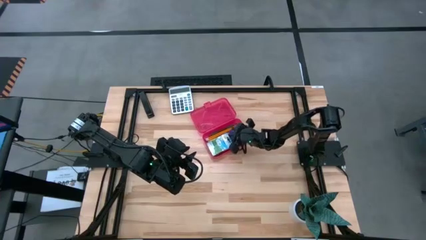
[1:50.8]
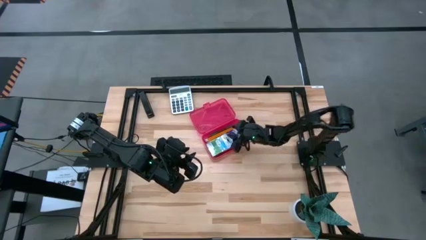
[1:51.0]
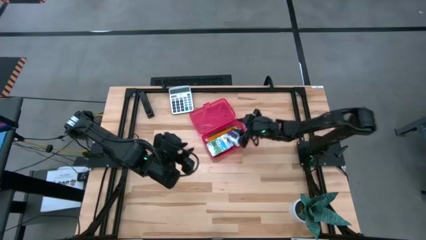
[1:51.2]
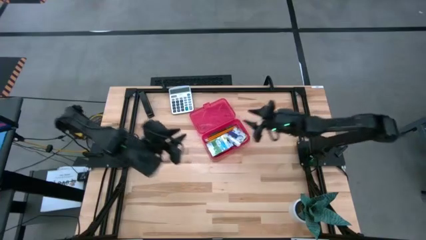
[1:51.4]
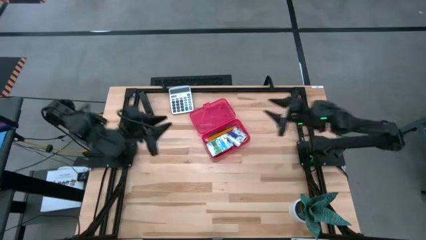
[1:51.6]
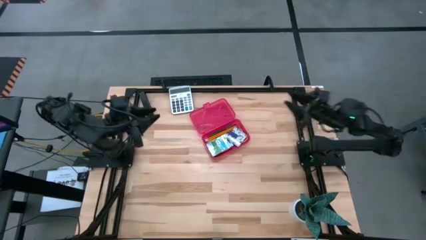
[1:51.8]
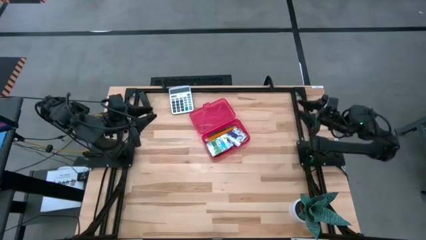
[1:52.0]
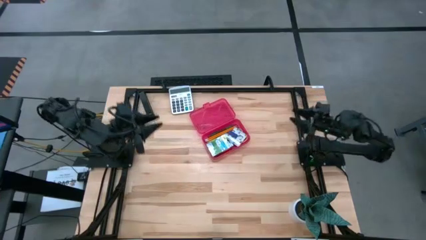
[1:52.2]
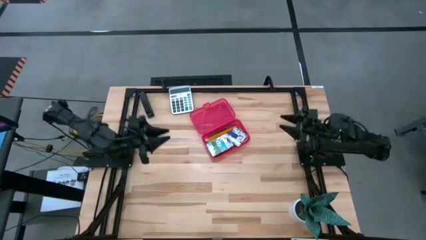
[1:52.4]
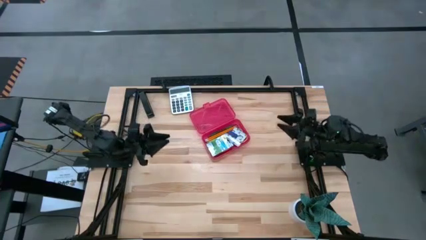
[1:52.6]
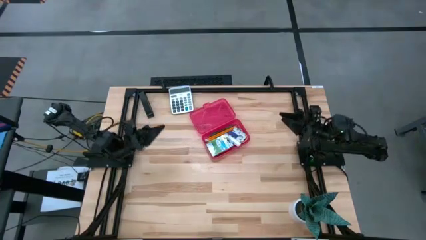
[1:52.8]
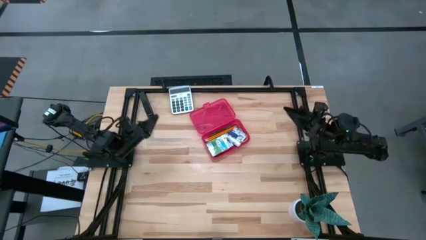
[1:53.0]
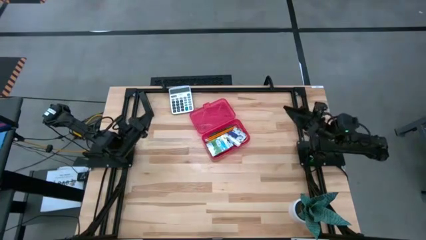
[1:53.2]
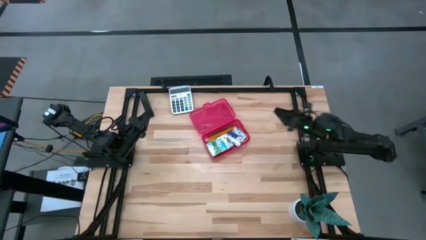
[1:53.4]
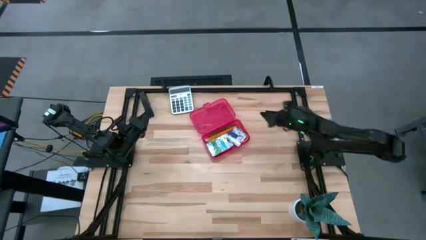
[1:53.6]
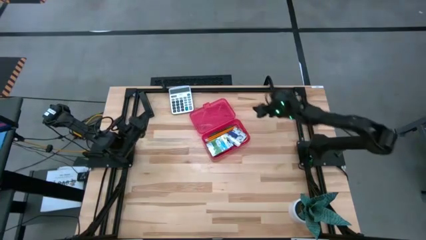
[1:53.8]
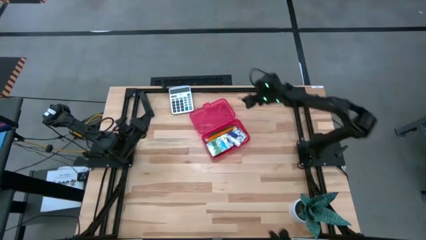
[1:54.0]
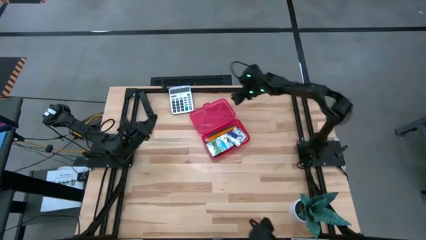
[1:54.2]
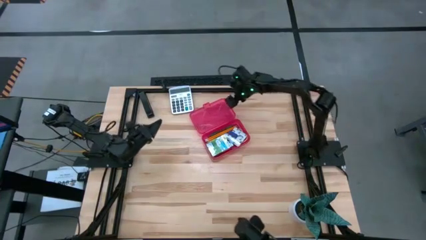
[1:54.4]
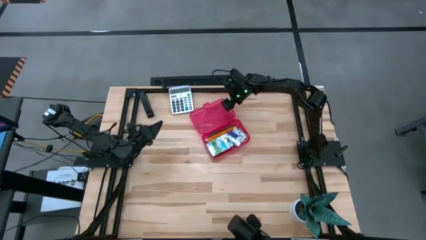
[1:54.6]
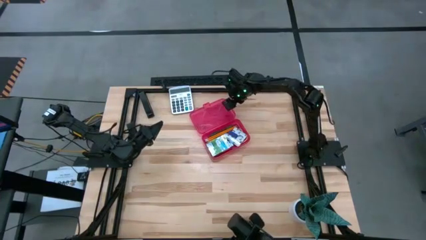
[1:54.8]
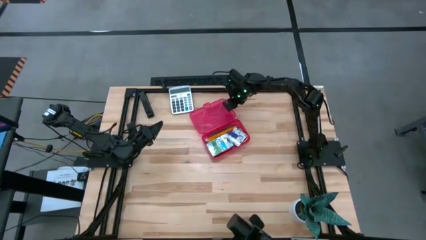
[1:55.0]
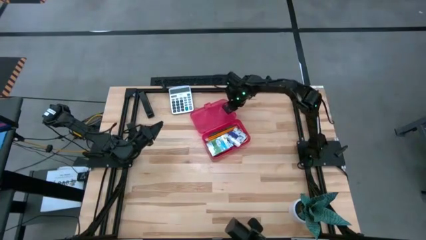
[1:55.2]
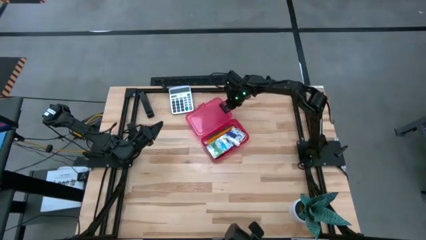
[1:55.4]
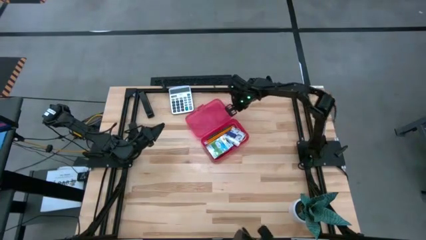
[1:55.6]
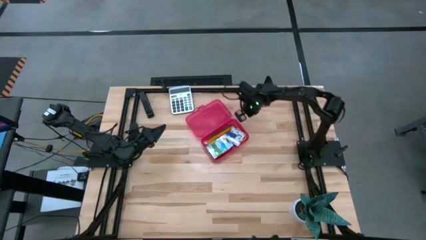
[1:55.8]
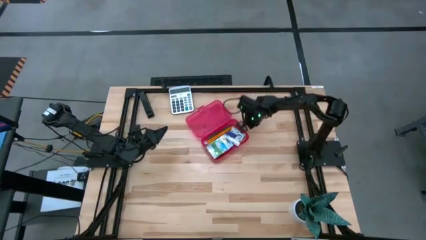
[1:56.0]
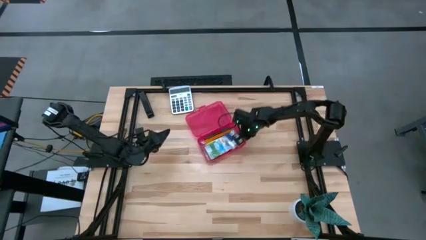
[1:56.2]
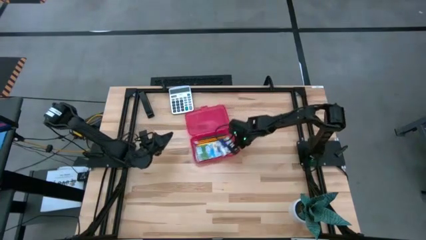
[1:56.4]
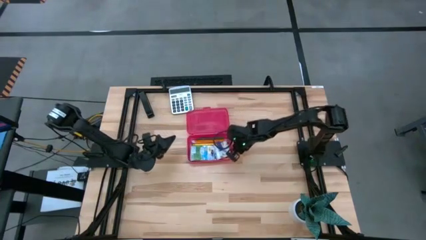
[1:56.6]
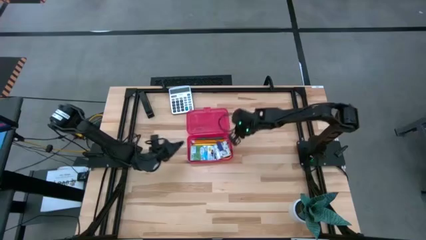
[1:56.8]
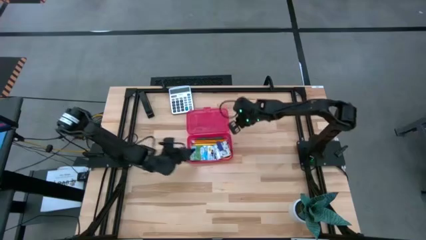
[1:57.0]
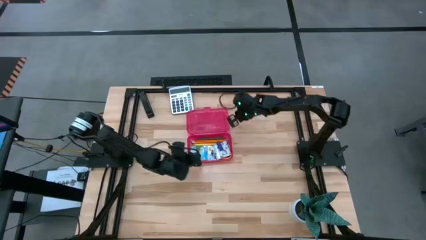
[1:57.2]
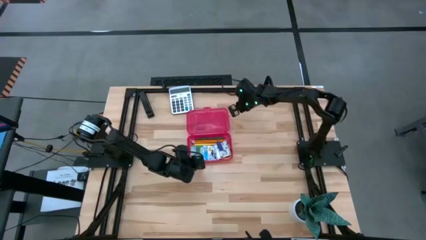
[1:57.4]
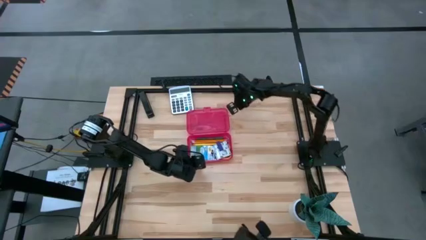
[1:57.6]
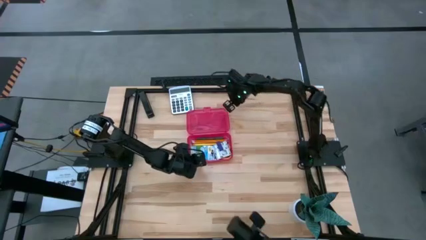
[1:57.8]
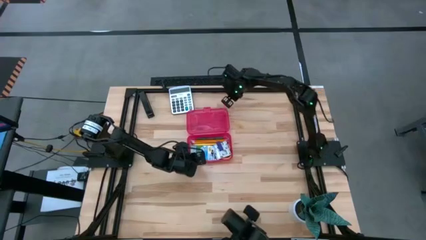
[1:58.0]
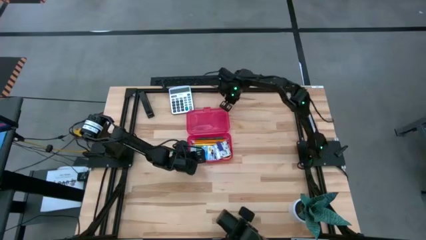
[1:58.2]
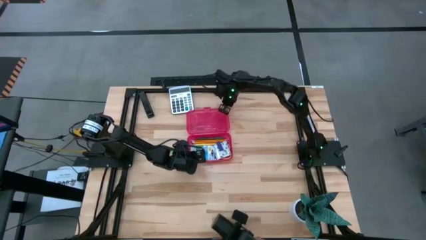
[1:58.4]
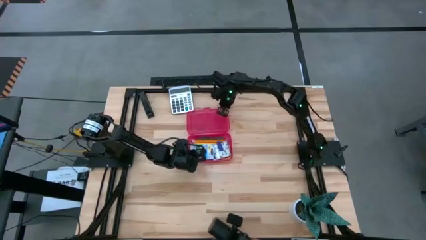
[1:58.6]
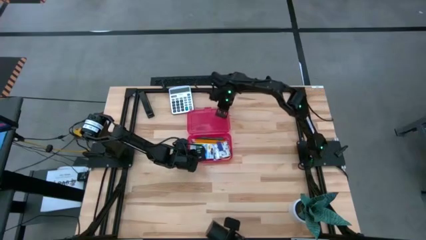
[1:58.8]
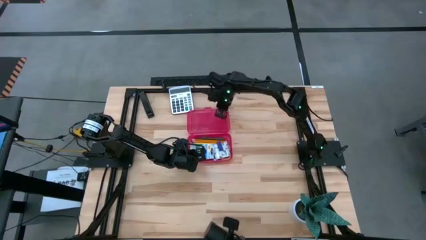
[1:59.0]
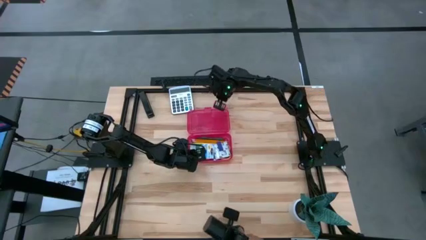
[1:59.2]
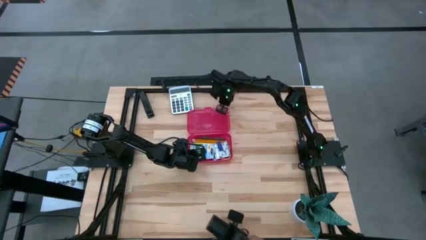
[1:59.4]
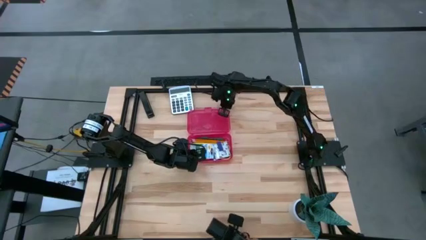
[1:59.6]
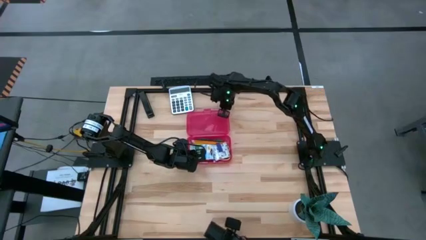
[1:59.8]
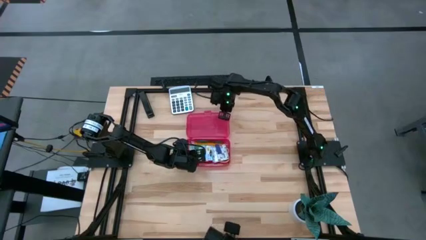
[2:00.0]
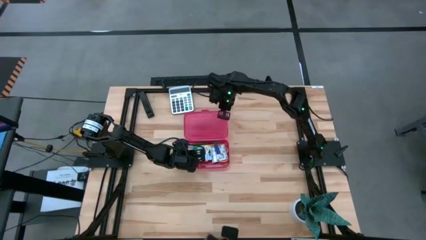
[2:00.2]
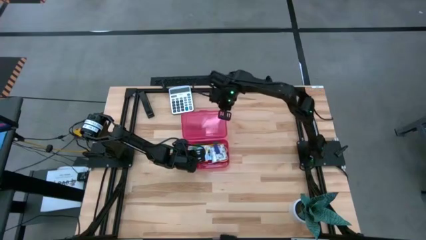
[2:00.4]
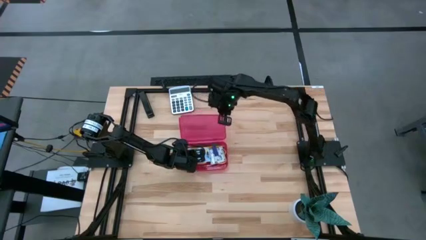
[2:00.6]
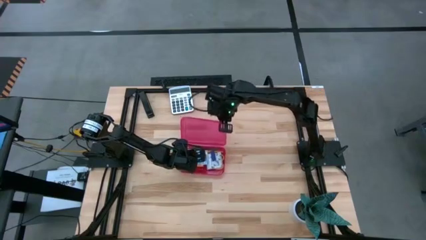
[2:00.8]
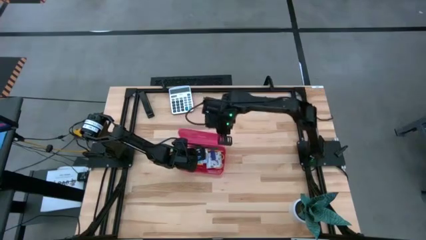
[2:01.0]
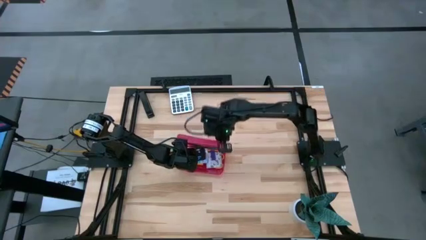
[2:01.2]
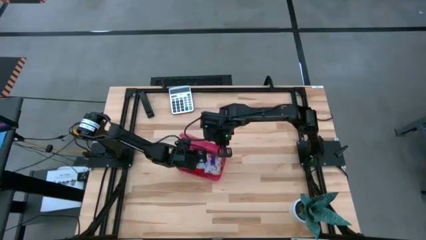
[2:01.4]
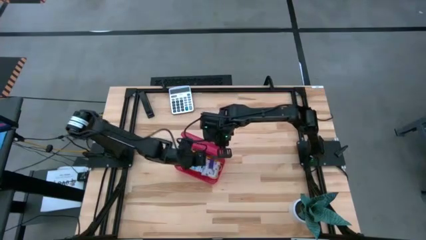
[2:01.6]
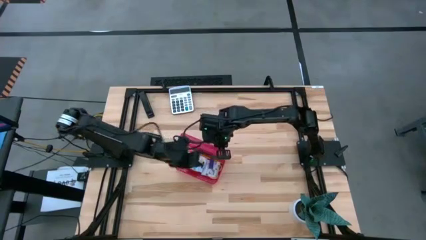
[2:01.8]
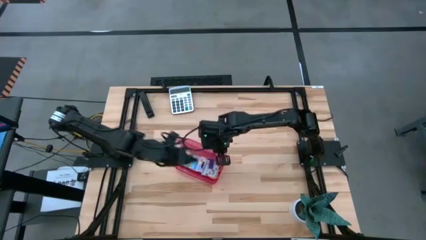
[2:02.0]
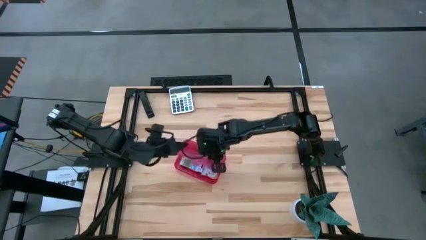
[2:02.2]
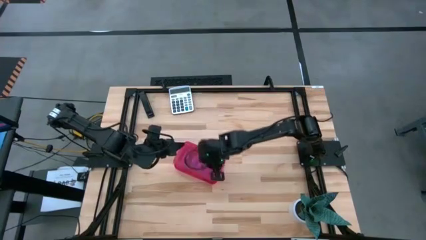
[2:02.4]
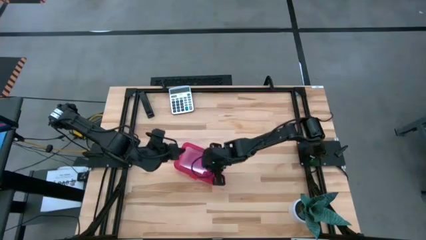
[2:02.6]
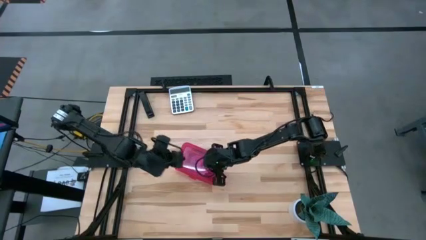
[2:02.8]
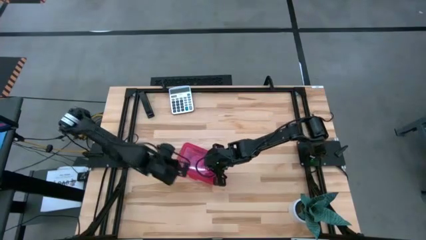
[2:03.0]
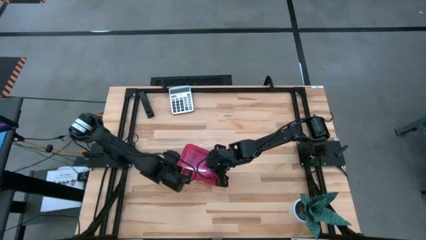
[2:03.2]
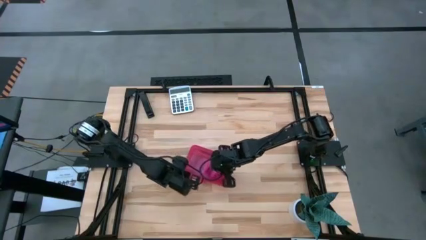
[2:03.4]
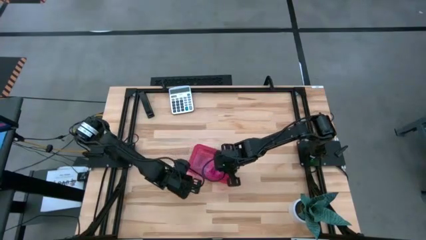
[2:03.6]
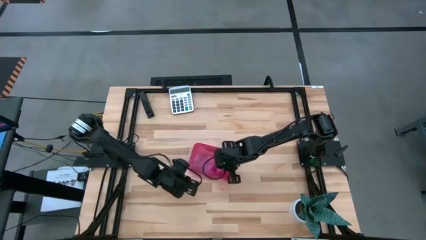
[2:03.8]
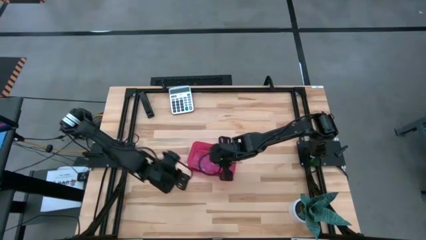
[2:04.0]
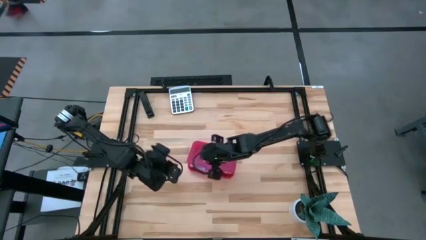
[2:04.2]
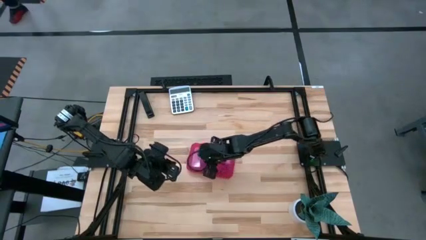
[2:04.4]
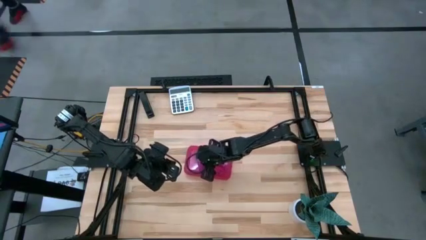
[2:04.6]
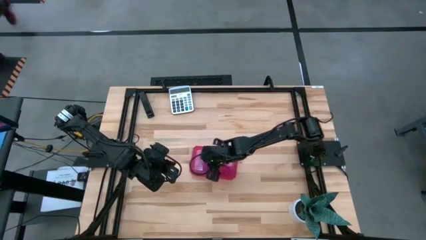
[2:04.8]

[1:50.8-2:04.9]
Task: Pack school essentials
Close the red supply box

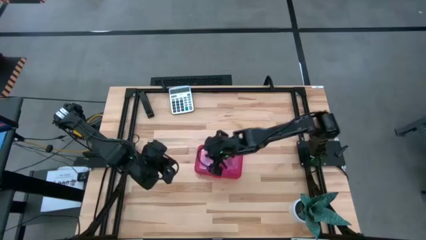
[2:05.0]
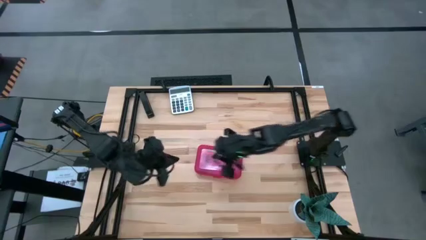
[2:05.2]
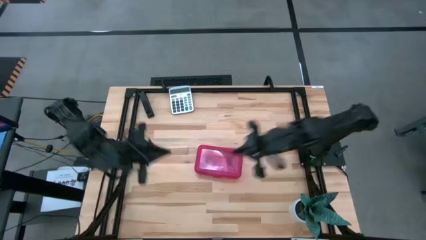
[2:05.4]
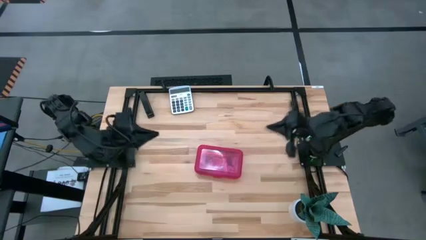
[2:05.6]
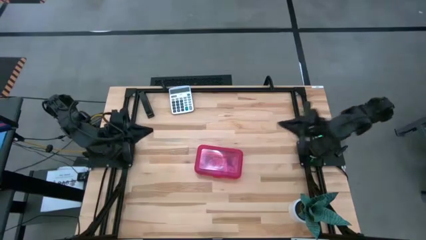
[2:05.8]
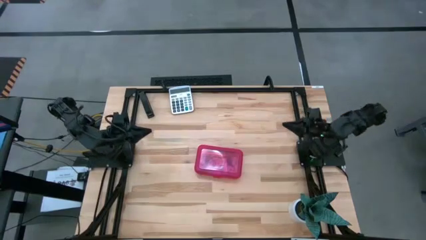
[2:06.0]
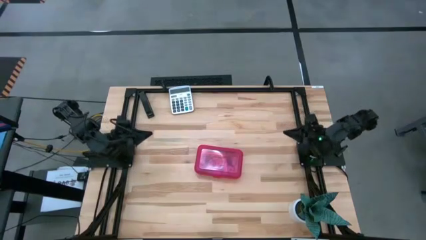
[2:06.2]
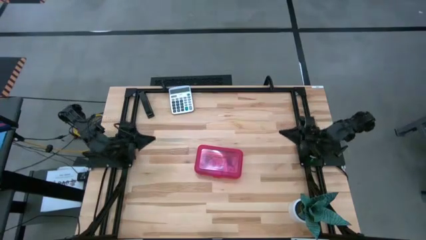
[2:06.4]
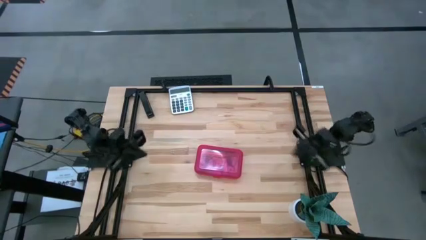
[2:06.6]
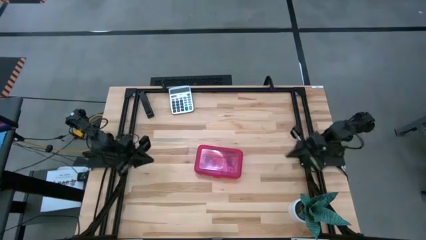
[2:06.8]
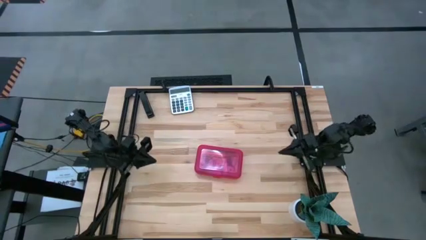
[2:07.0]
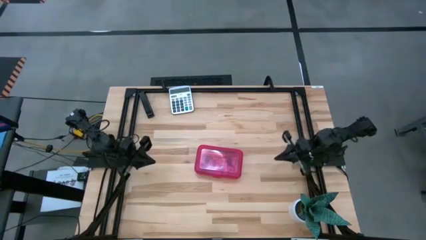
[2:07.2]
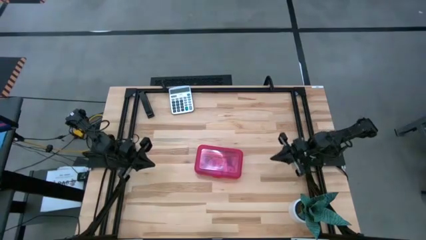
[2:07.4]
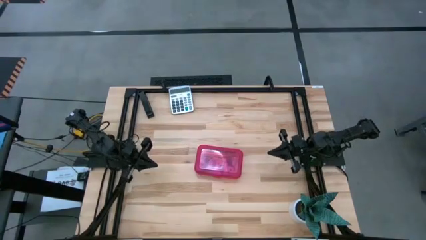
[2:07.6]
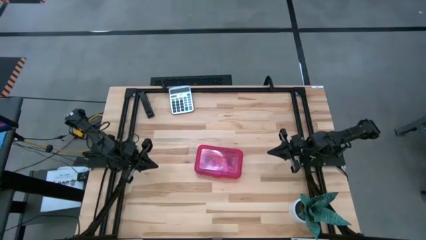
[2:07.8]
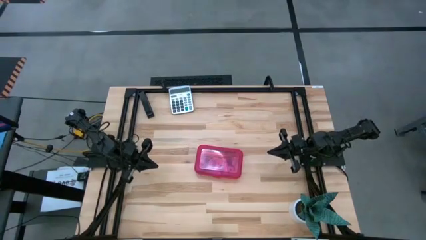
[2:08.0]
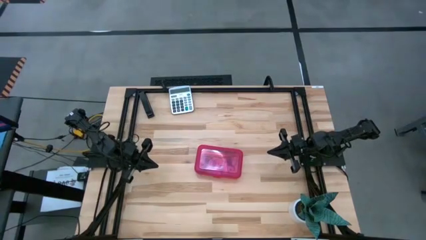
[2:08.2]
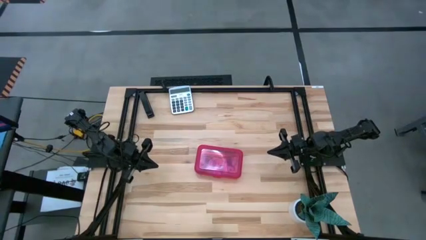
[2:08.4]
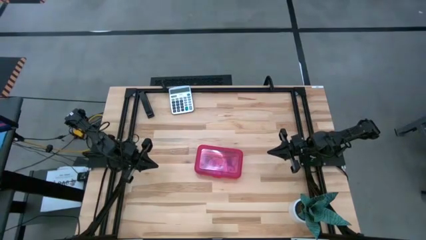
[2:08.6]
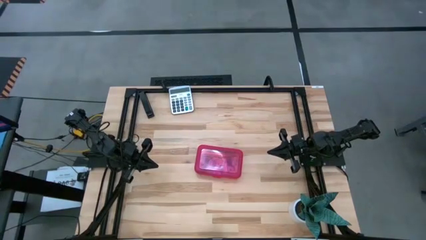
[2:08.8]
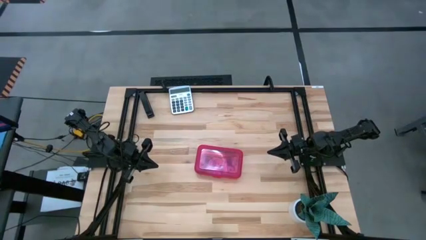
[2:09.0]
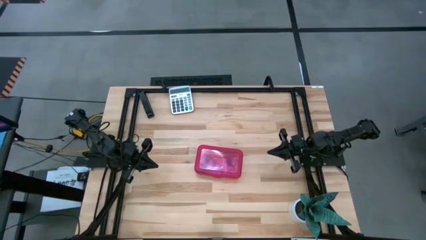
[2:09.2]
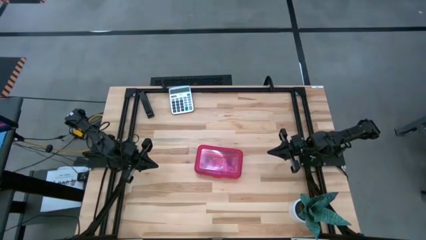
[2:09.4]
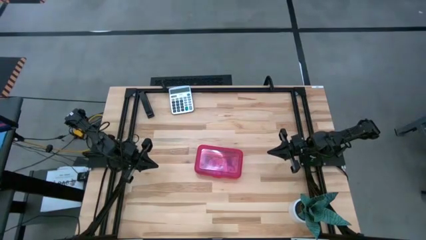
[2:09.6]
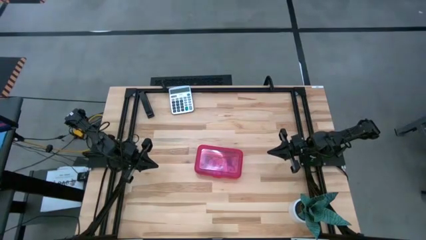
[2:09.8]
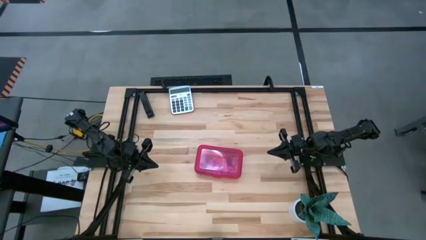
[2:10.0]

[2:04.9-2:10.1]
Return to Home Position
